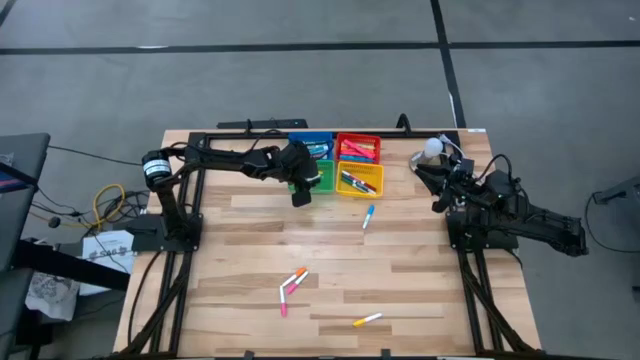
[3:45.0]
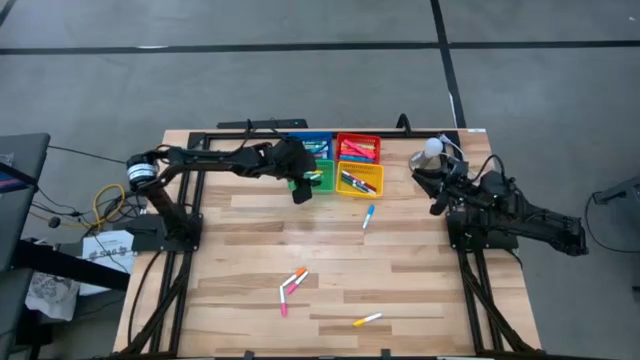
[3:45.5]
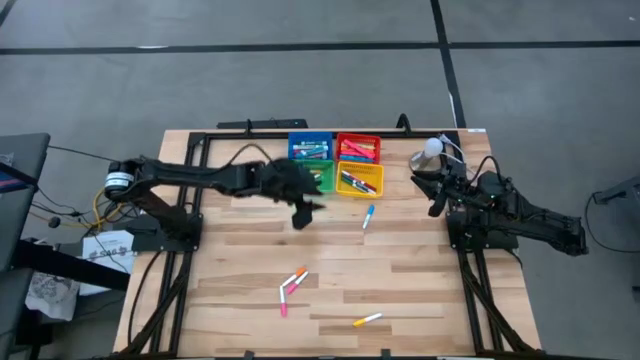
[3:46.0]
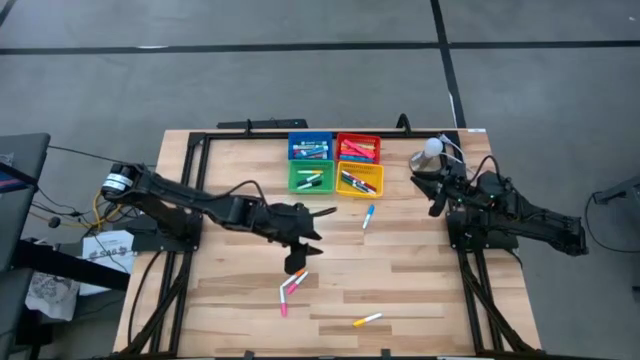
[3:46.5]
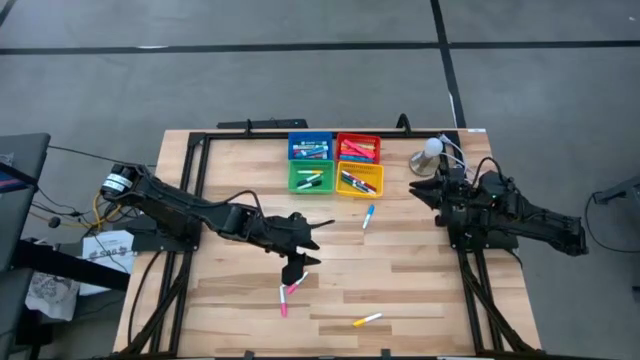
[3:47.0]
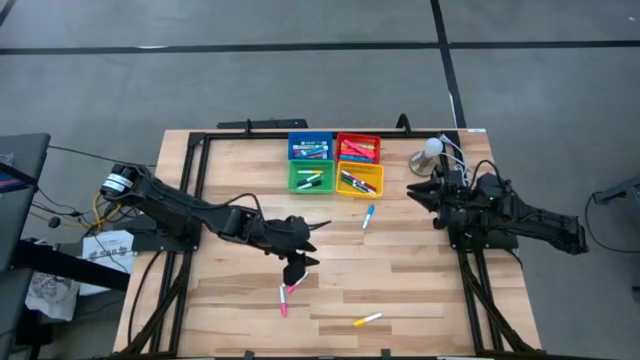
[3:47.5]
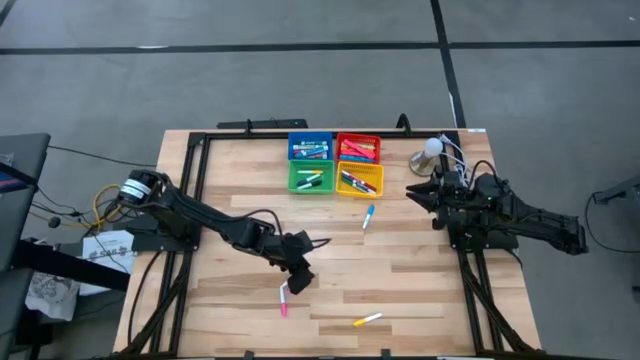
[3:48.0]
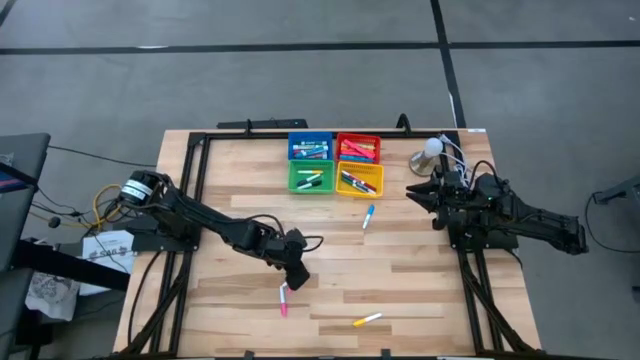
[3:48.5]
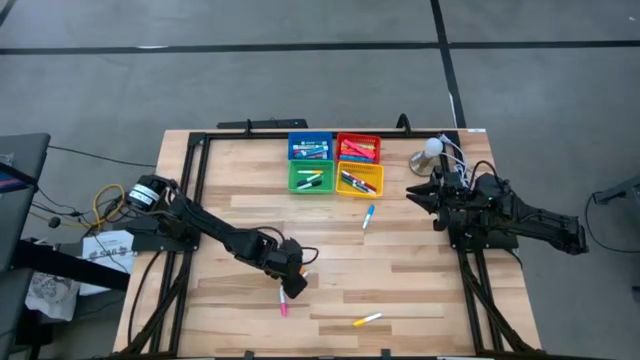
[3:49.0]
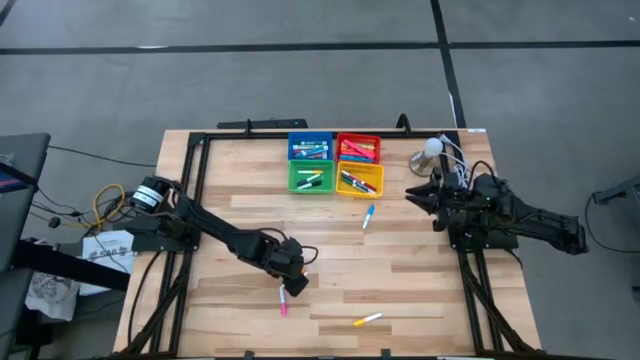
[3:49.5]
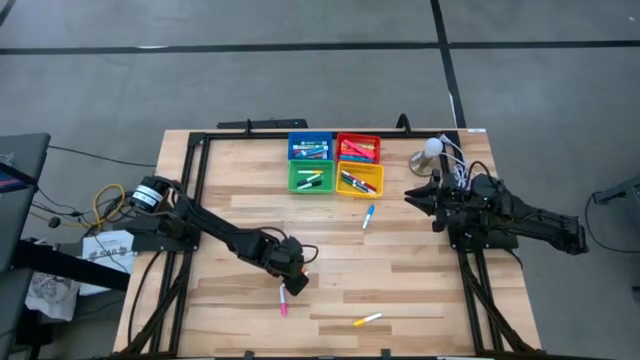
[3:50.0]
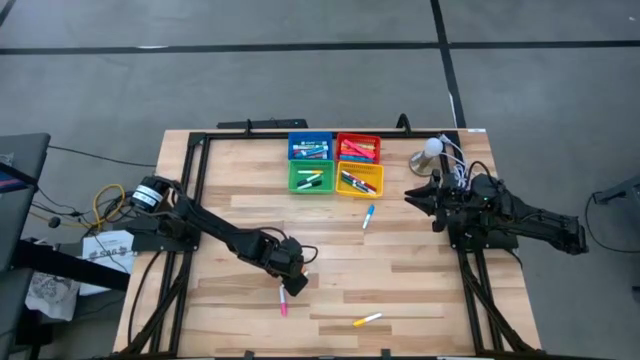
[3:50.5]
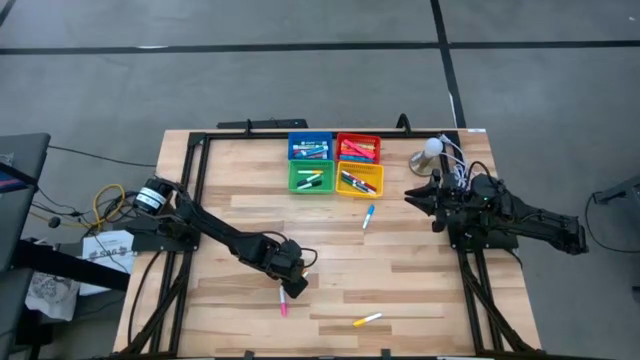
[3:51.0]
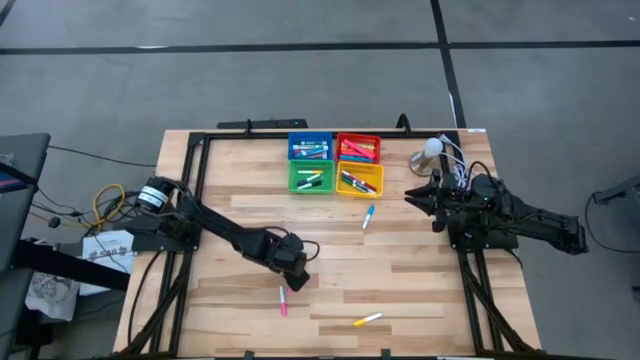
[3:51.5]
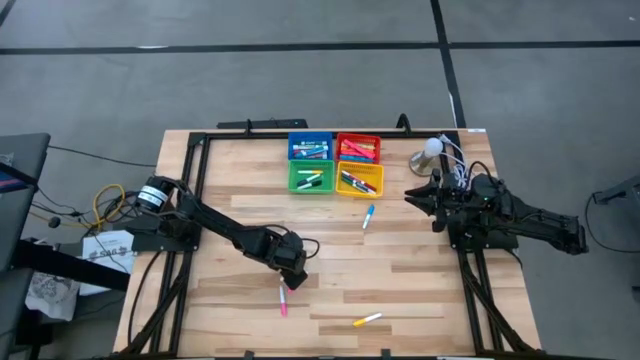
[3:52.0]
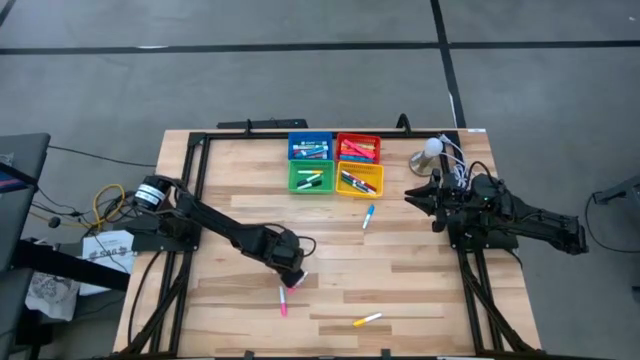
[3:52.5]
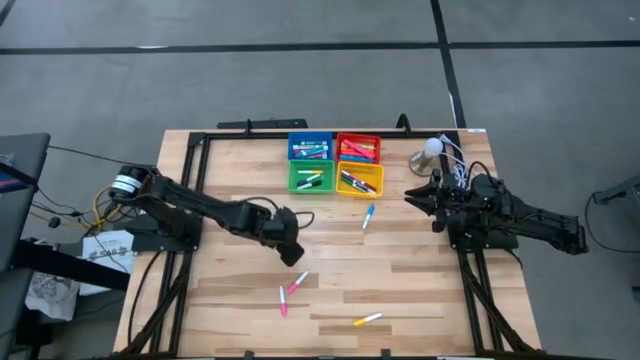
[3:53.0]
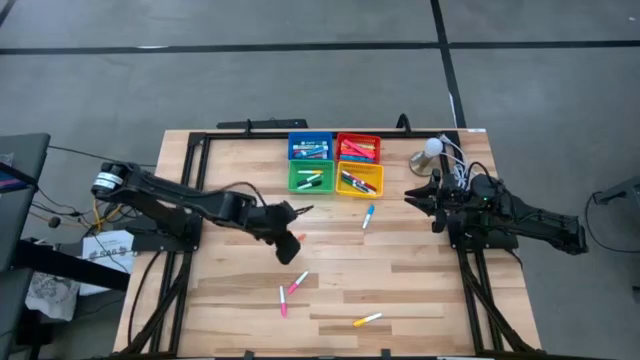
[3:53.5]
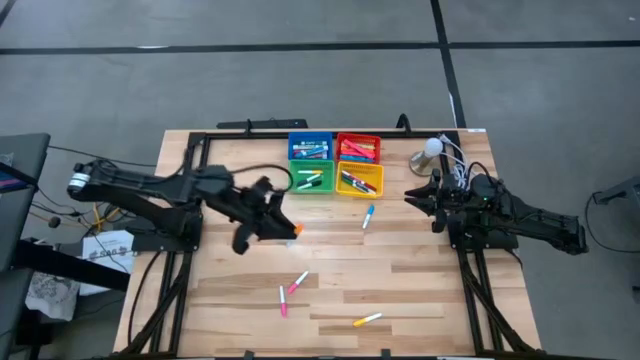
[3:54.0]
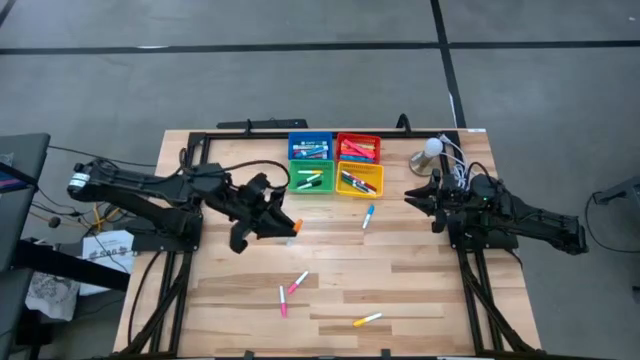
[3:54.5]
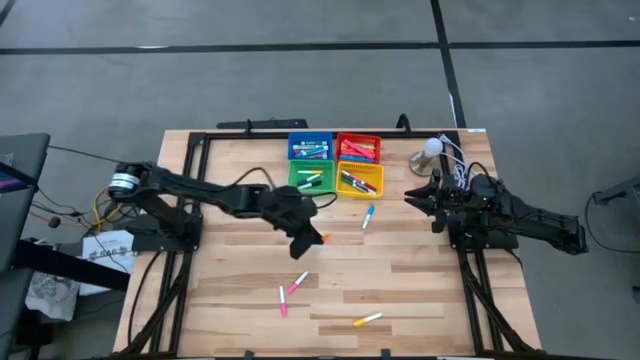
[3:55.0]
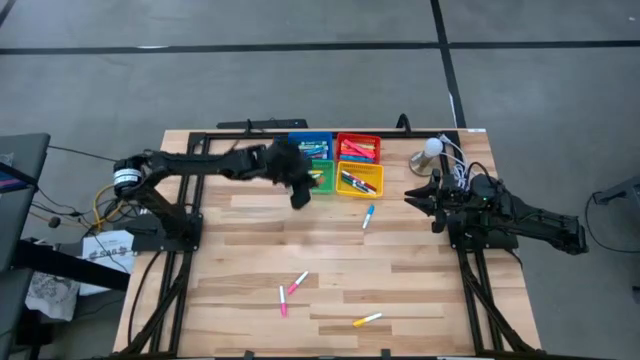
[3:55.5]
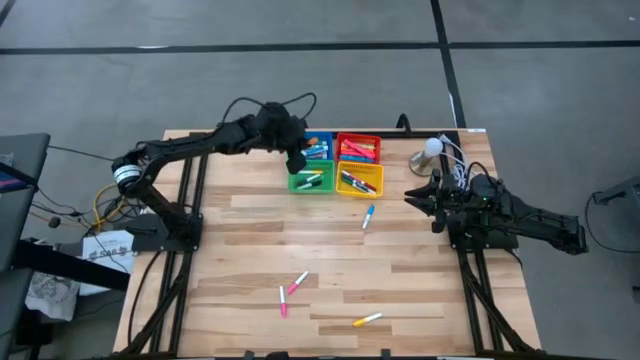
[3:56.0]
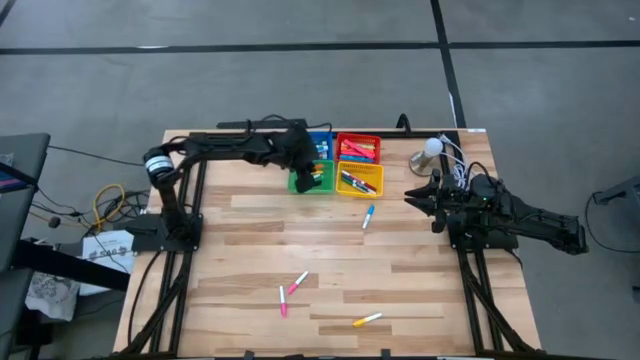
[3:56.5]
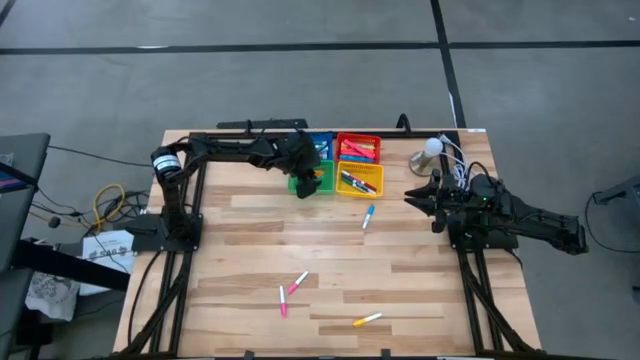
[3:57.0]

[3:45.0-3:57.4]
Task: Pick & Place Markers
Put the orange highlighter in the green bin

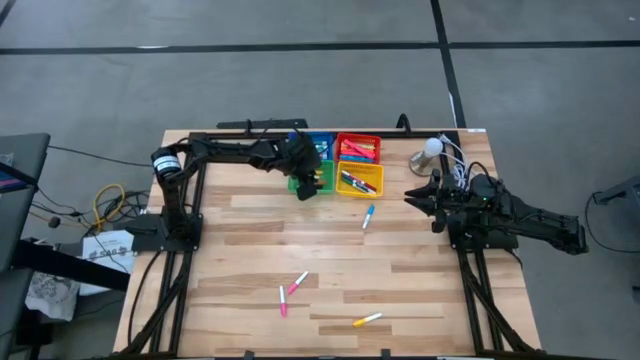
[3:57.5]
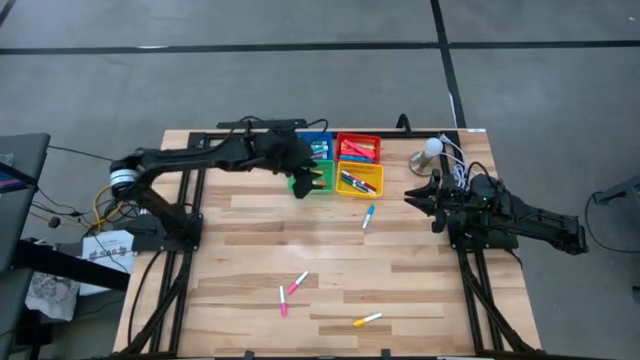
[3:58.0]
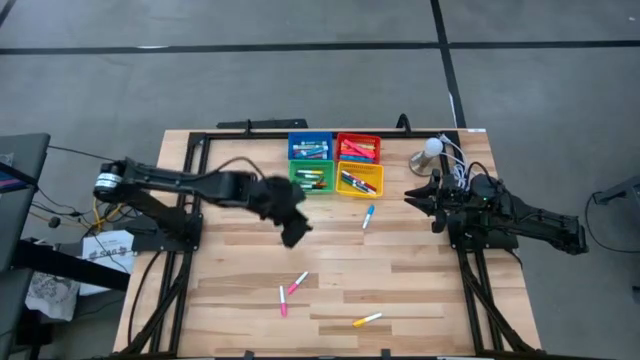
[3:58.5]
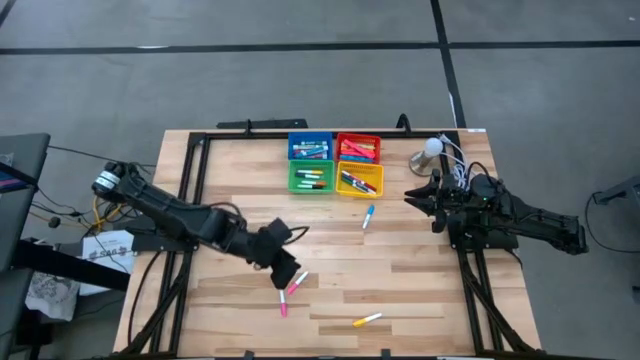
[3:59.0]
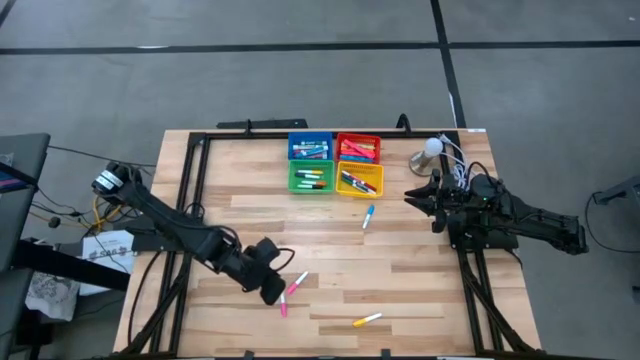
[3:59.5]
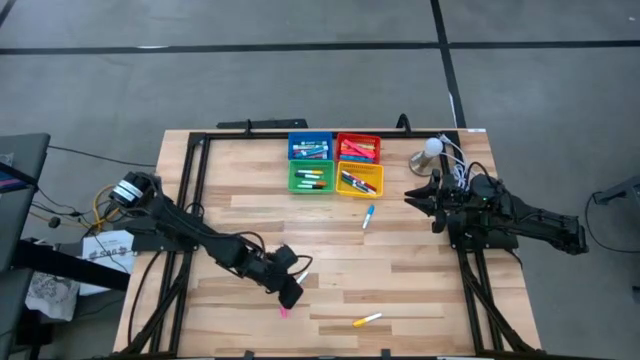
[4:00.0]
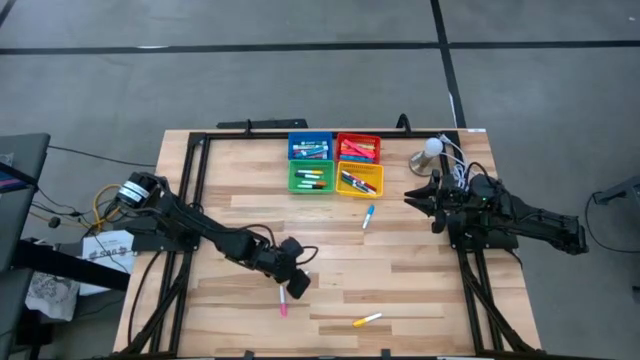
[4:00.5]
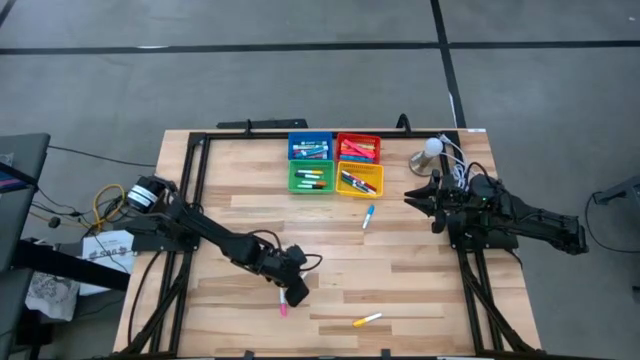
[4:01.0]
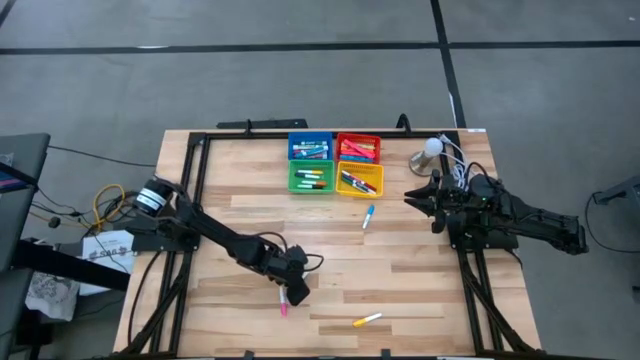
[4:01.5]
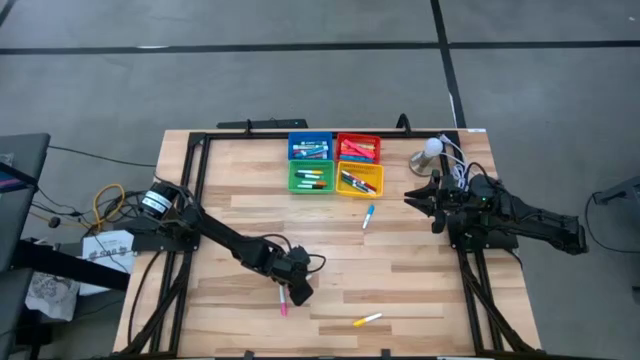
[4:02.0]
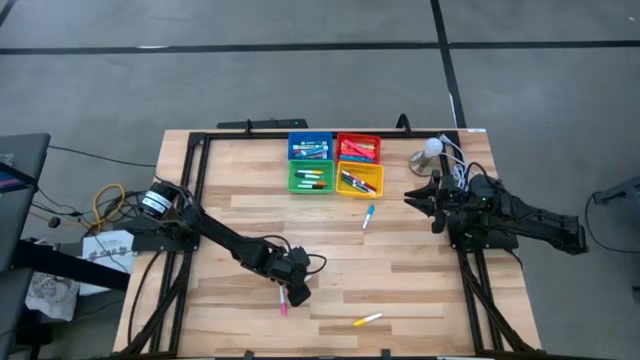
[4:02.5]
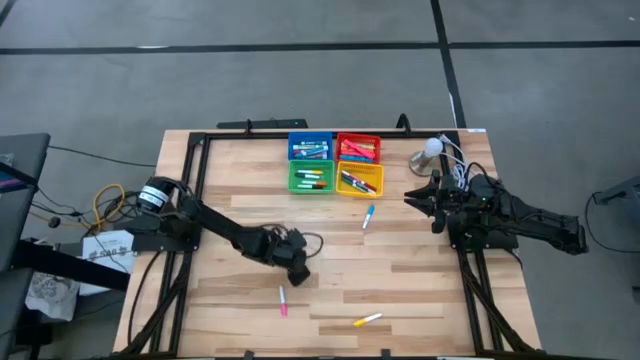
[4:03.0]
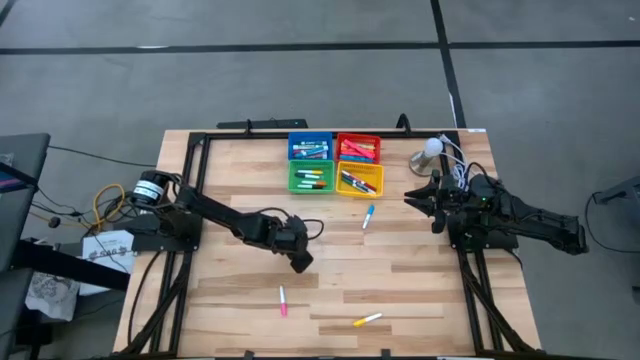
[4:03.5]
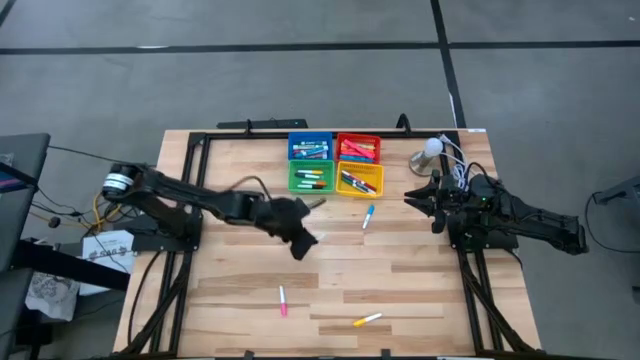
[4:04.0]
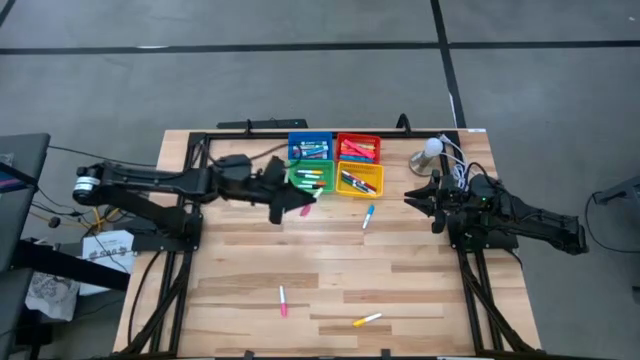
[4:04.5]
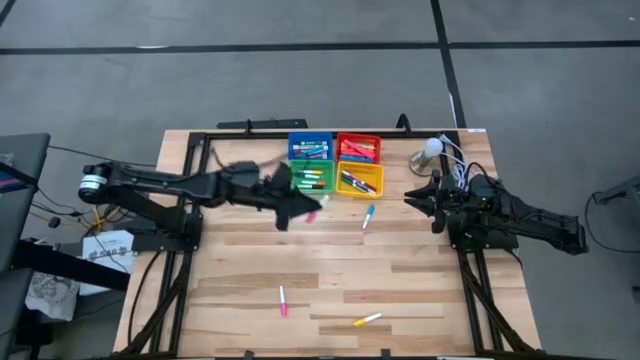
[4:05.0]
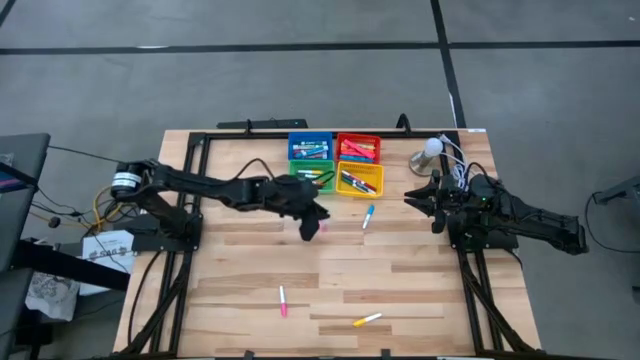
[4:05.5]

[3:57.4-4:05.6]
Put the pink highlighter in the green bin
